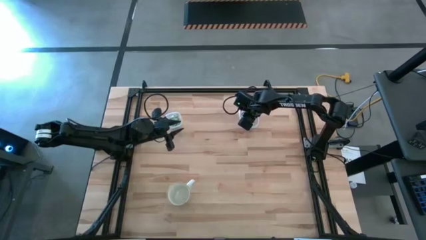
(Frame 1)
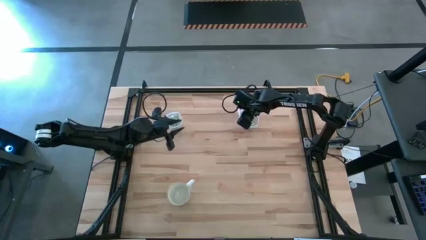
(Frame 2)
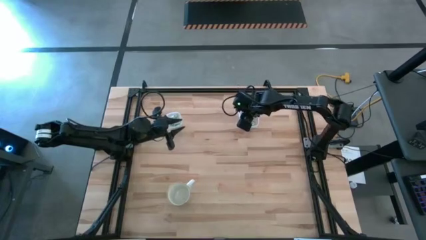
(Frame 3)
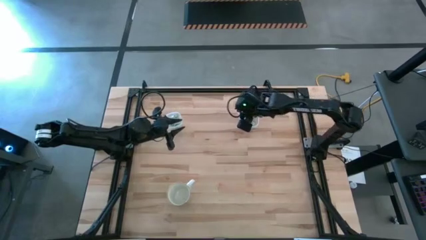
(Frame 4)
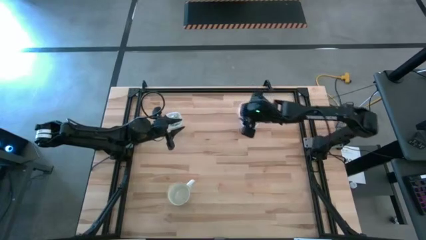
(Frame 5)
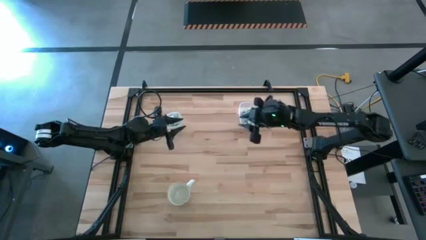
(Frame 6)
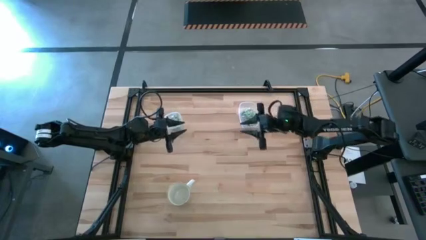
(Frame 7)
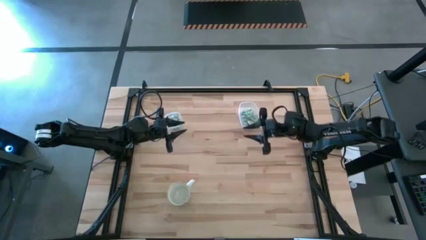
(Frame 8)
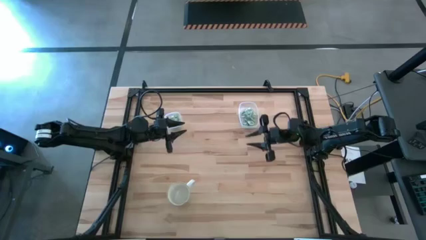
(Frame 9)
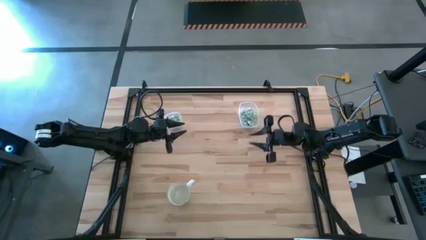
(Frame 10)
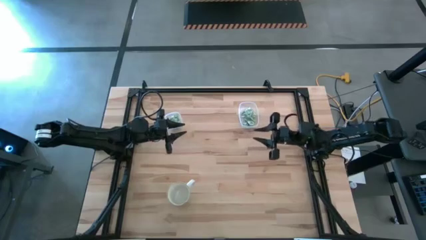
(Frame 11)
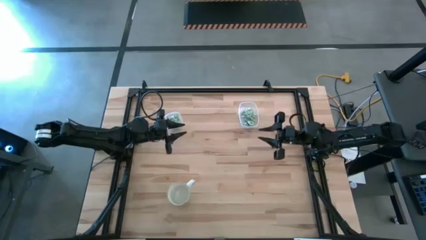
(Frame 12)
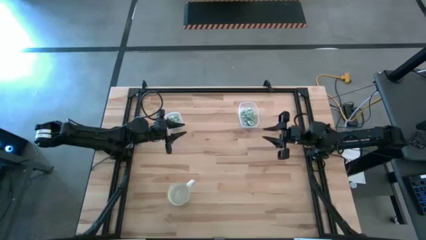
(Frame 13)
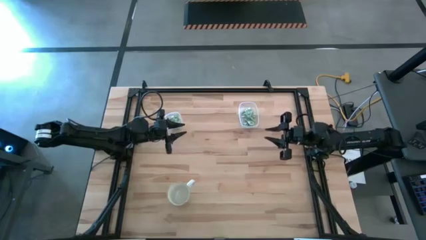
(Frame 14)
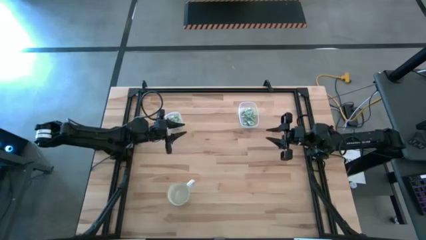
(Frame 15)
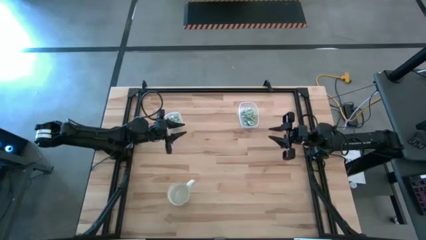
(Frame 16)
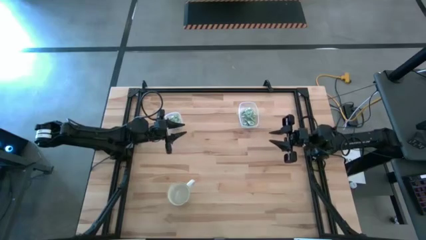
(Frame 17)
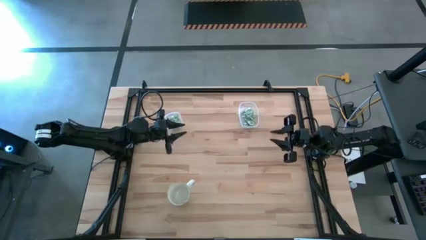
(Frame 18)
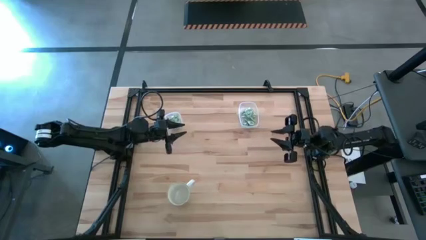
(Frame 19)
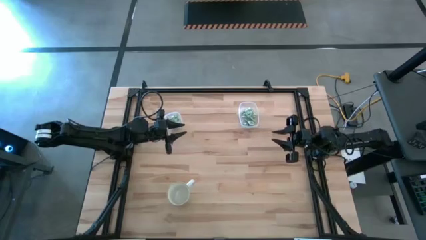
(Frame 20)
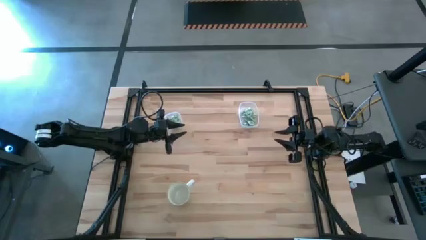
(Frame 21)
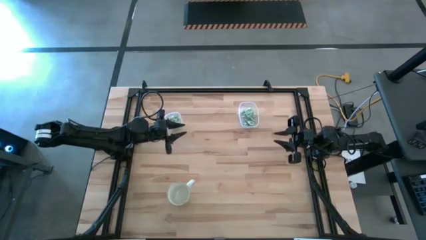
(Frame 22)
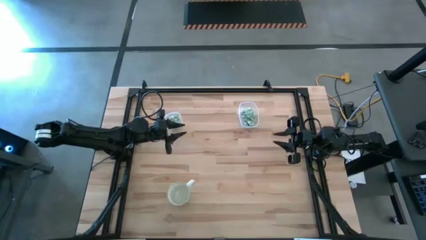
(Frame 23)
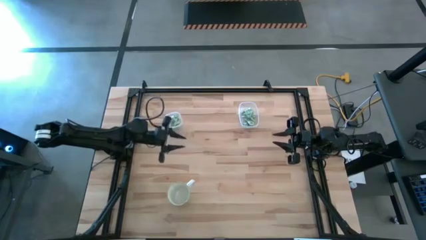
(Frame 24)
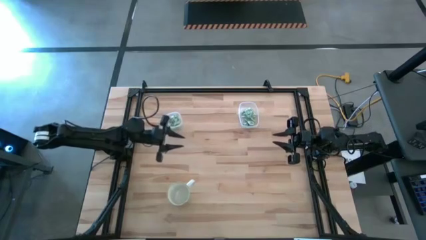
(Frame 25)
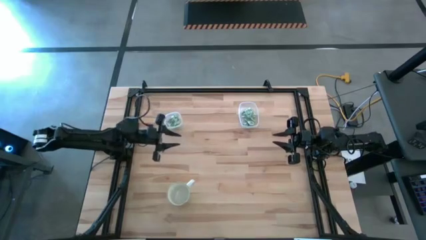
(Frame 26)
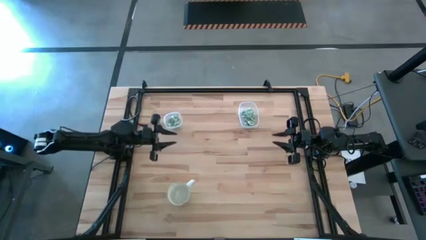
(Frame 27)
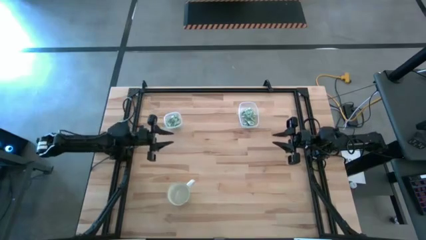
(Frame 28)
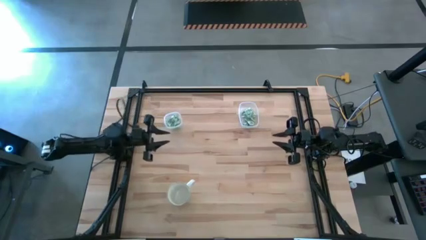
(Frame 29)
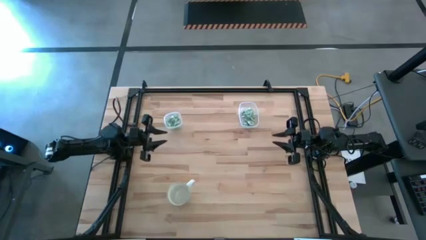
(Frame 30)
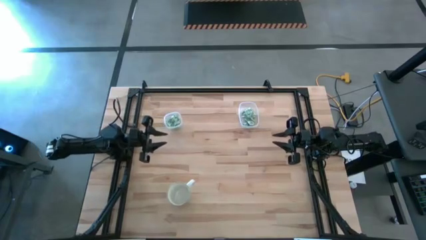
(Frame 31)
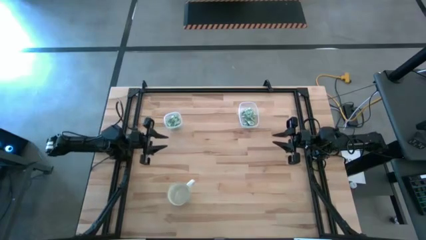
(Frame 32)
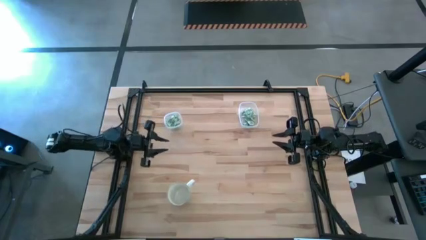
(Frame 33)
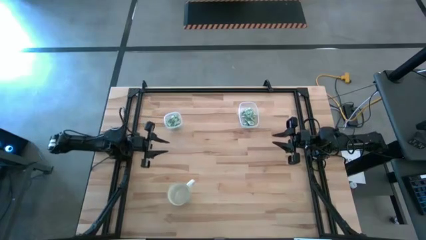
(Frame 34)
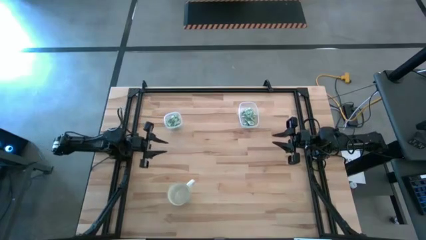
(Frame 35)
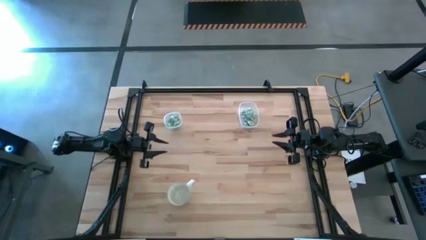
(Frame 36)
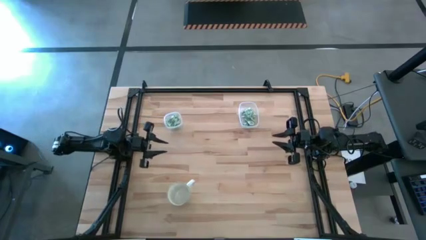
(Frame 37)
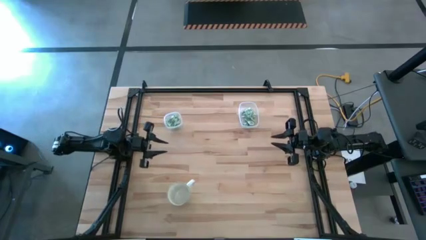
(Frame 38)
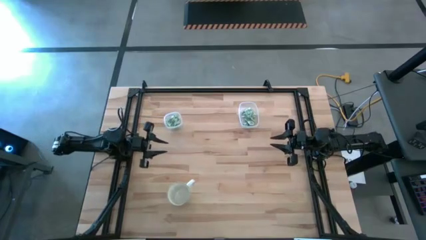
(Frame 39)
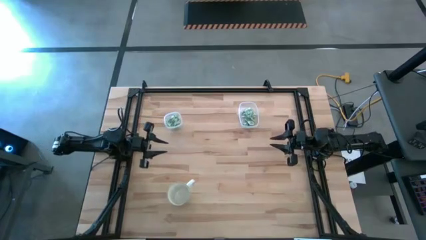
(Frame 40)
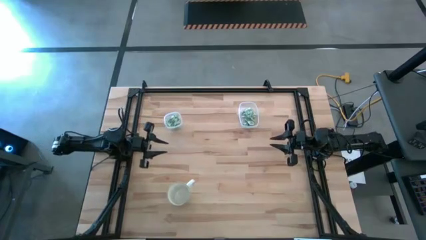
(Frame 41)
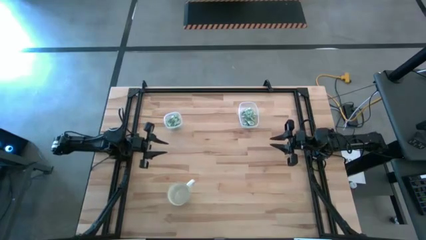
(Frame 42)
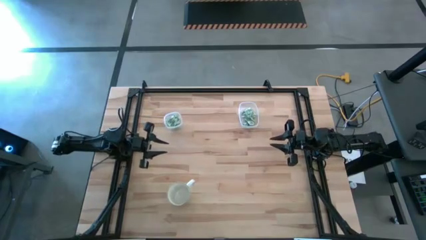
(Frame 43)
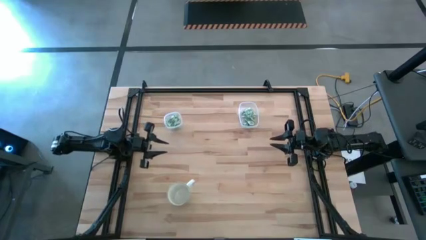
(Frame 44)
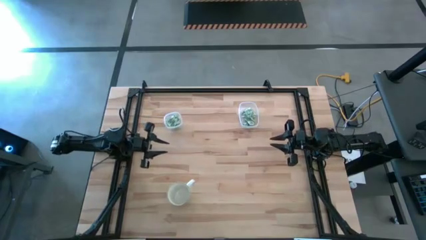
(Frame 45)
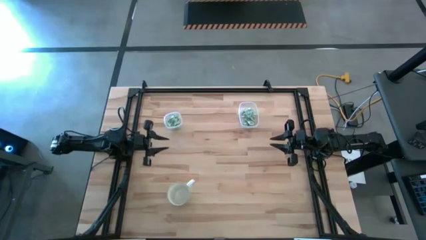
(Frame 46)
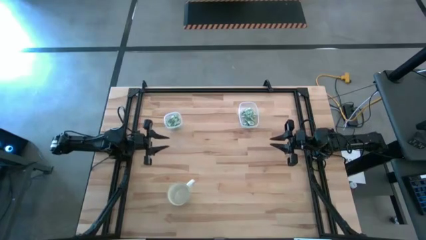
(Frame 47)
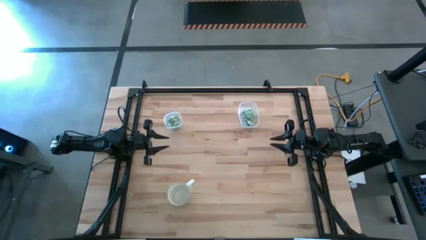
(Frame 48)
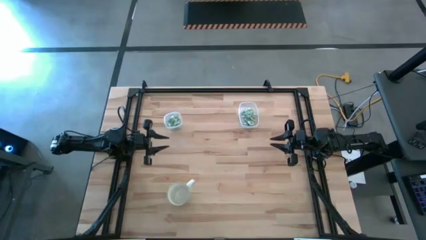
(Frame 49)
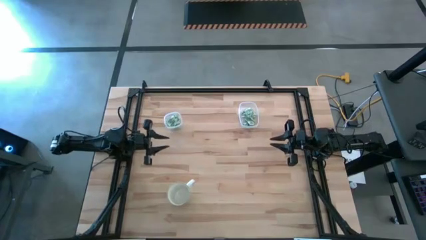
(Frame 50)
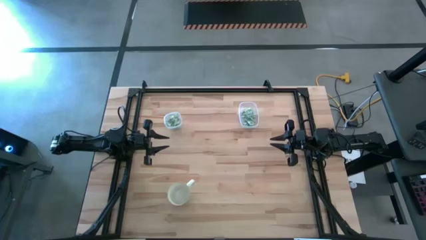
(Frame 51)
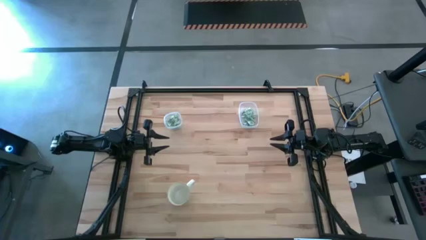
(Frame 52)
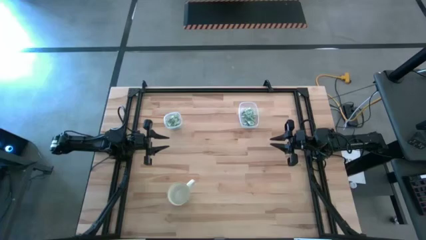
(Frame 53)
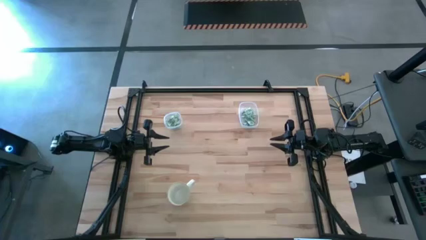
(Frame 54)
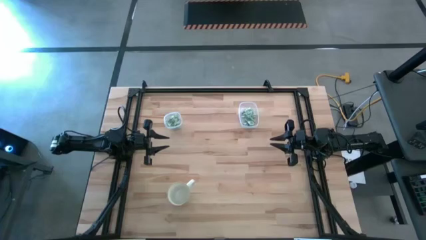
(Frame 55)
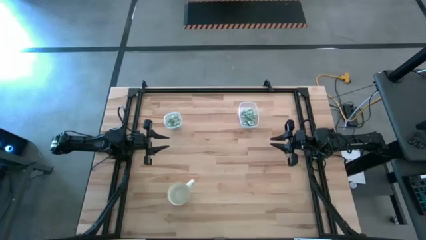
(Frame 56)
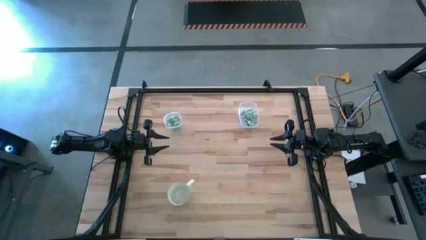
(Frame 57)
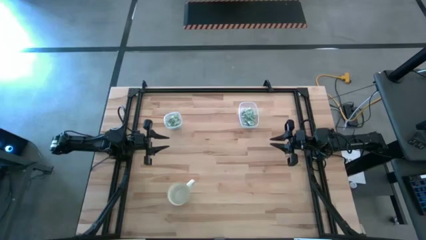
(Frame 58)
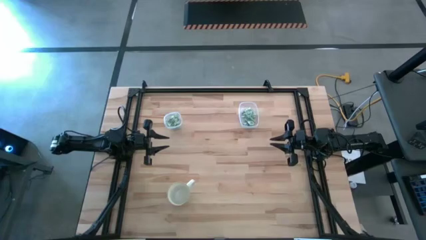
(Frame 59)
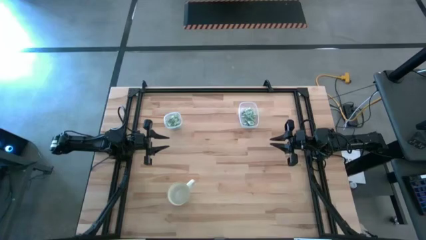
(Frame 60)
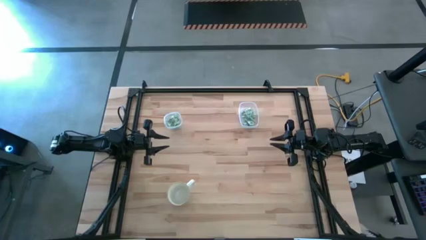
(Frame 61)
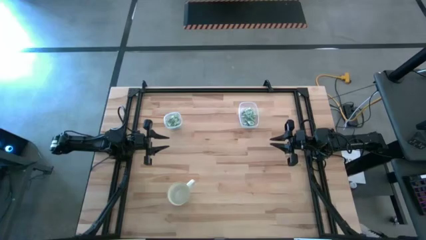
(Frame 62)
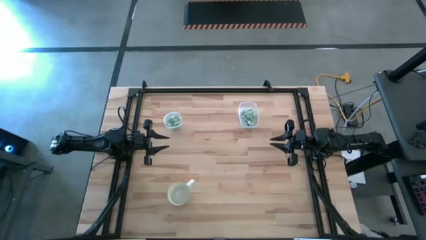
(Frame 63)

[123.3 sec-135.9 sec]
Task: Pick and place items into bin
Return to Home Position

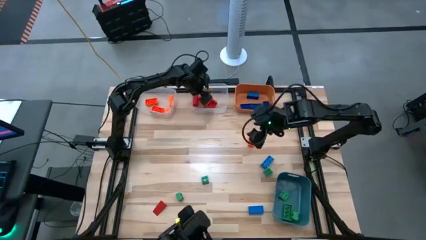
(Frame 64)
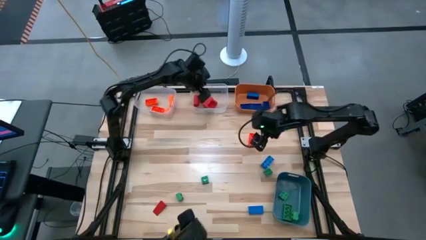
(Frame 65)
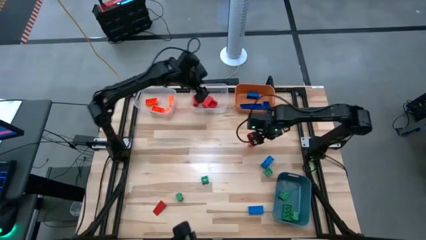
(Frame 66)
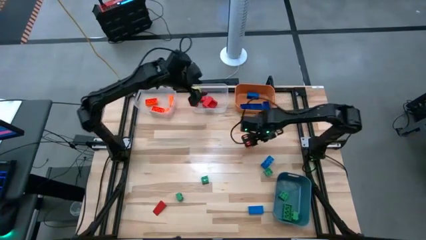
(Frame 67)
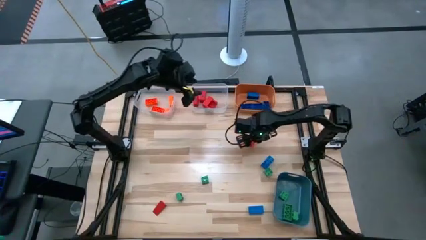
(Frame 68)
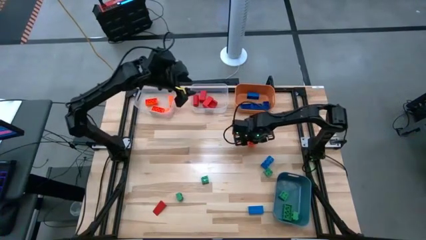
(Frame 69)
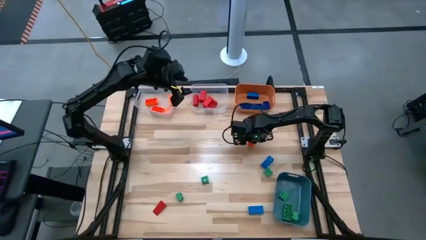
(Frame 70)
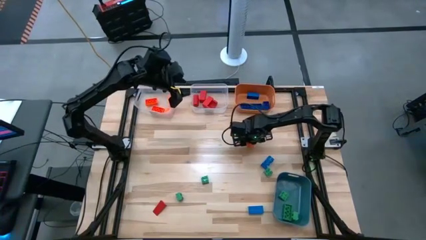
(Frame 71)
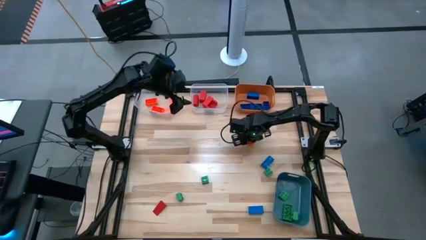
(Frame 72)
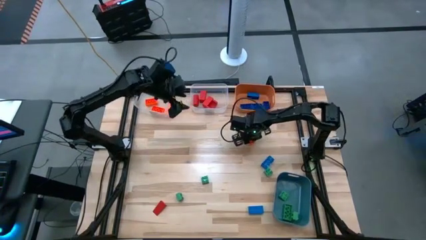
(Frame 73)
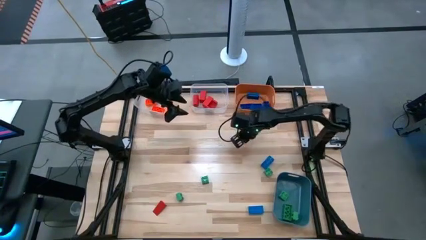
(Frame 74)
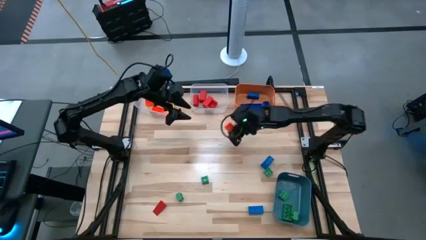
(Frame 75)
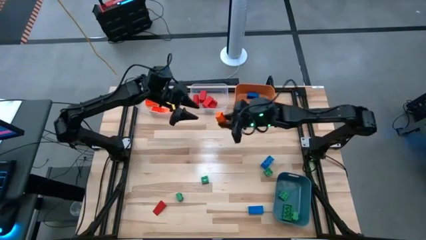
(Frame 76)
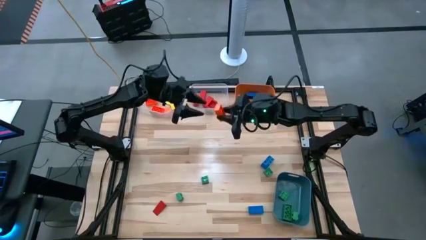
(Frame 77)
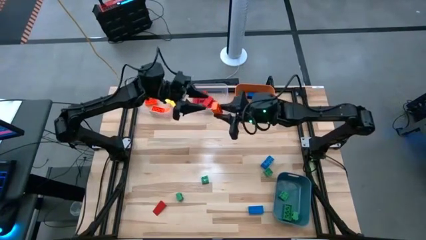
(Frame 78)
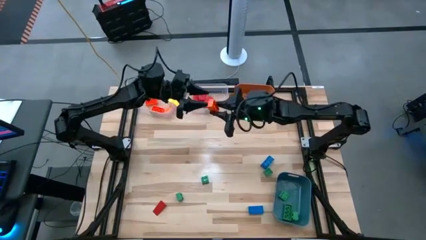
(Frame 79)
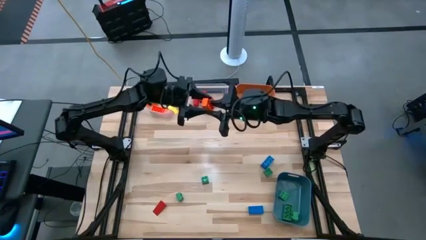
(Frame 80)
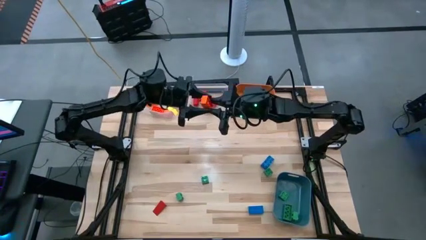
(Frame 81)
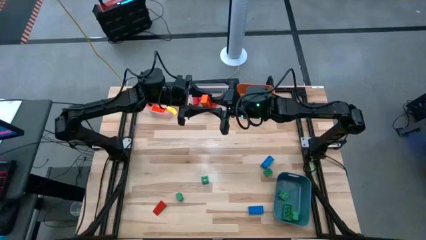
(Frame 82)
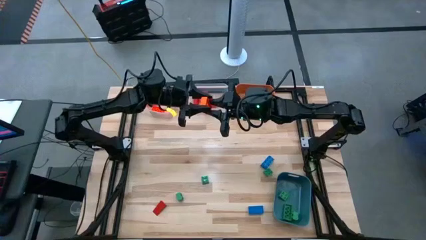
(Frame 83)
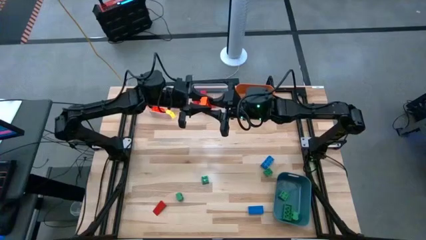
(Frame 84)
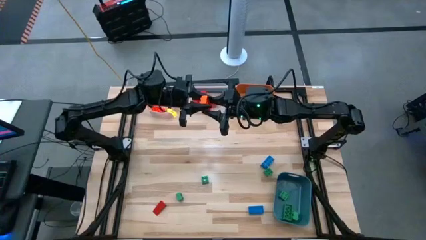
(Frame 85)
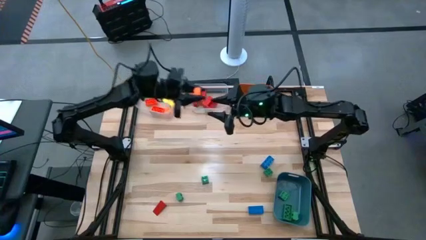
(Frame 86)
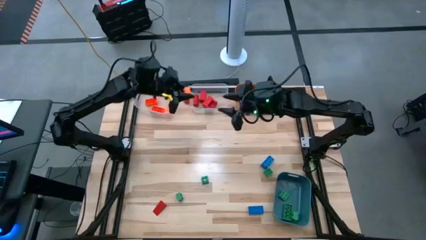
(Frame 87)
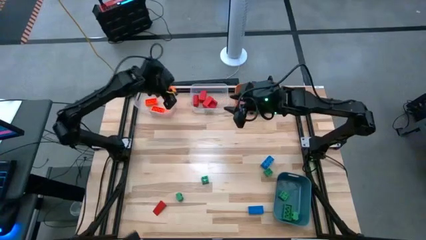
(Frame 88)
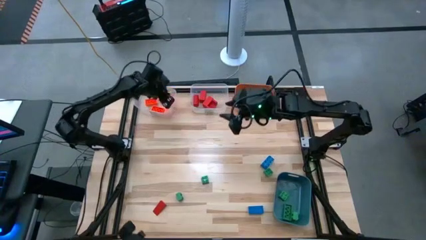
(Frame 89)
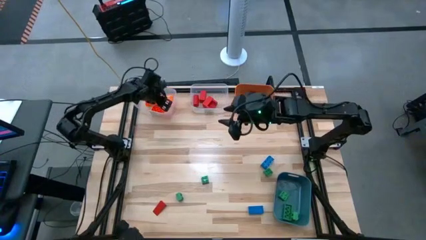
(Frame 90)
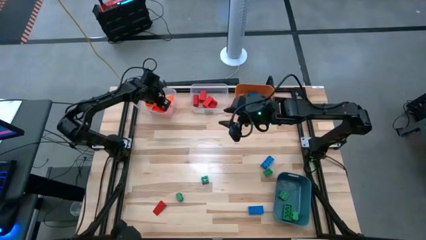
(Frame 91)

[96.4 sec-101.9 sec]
Task: Sort blocks
Put the orange game piece into the left transparent bin
